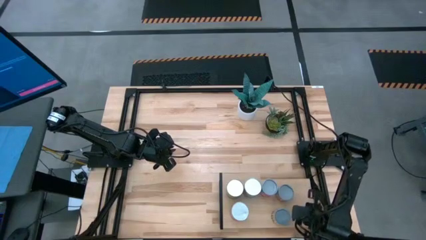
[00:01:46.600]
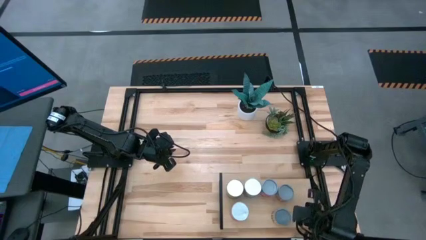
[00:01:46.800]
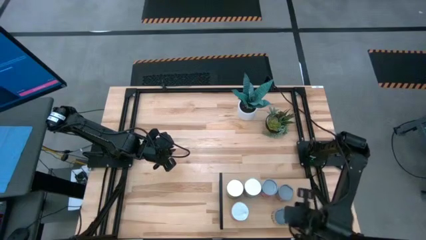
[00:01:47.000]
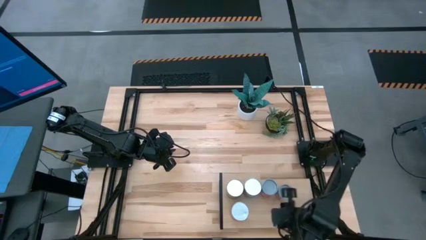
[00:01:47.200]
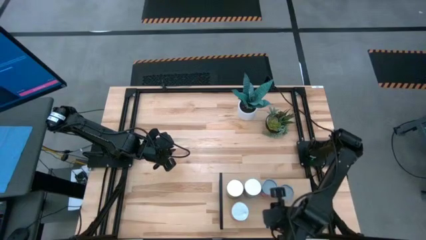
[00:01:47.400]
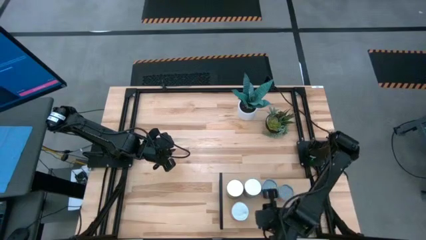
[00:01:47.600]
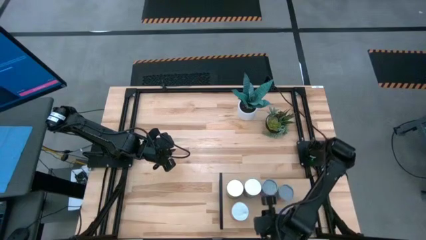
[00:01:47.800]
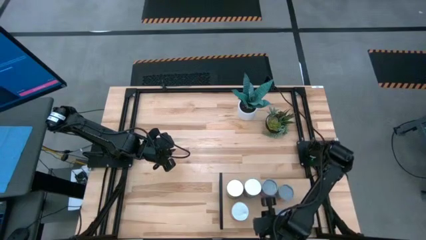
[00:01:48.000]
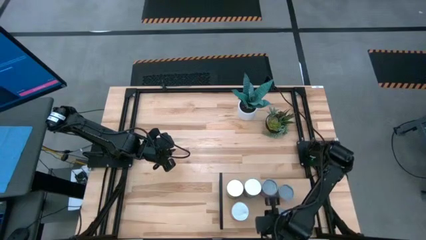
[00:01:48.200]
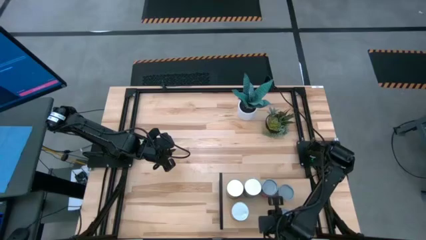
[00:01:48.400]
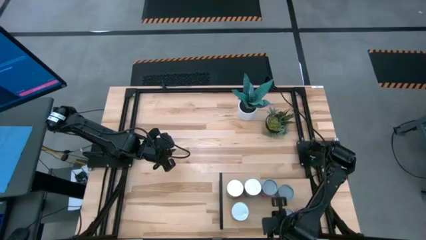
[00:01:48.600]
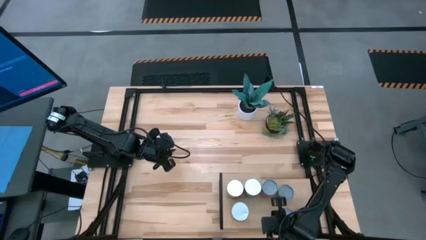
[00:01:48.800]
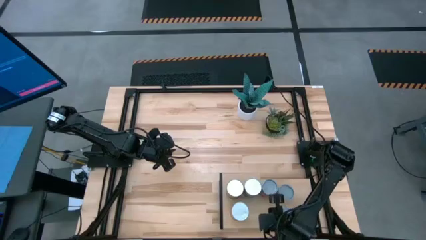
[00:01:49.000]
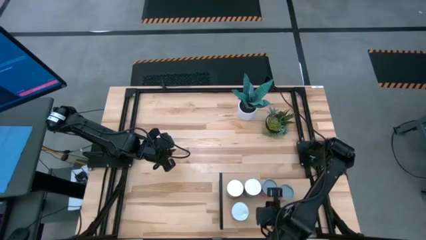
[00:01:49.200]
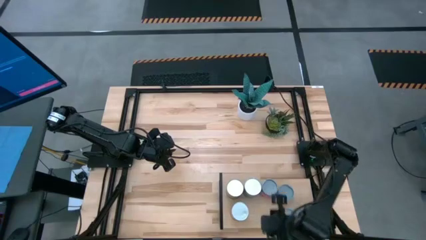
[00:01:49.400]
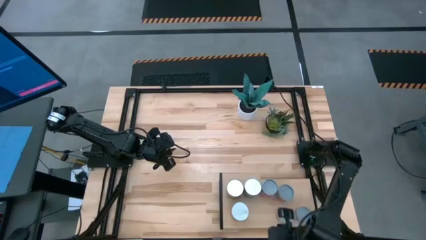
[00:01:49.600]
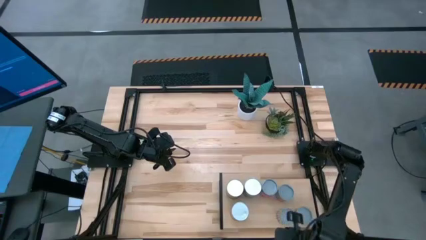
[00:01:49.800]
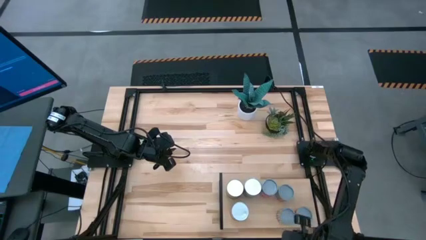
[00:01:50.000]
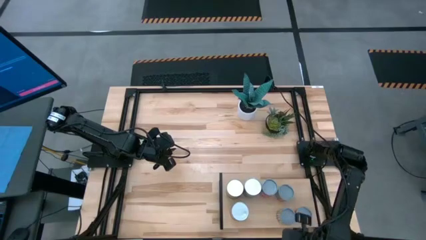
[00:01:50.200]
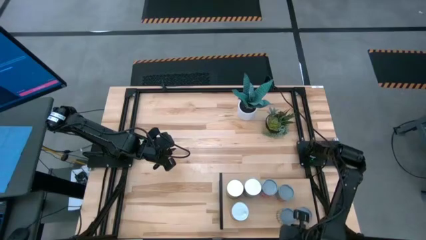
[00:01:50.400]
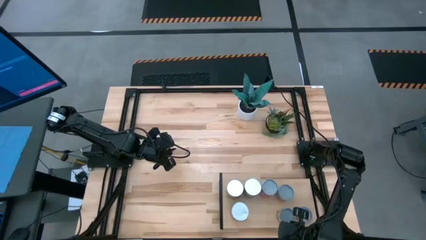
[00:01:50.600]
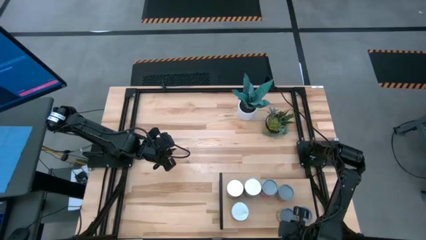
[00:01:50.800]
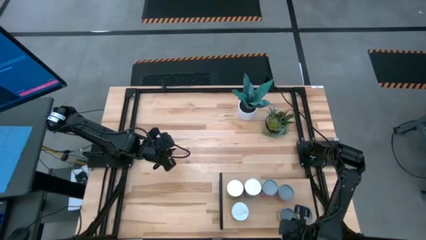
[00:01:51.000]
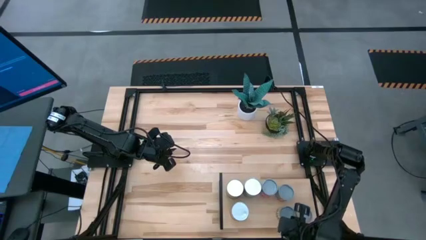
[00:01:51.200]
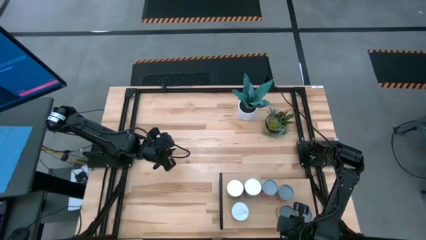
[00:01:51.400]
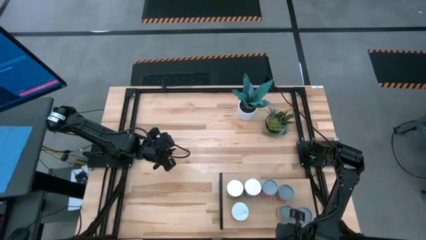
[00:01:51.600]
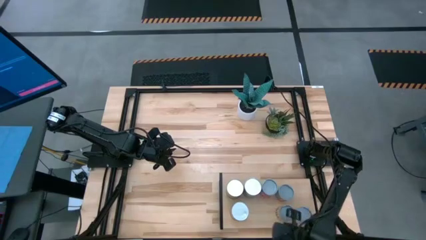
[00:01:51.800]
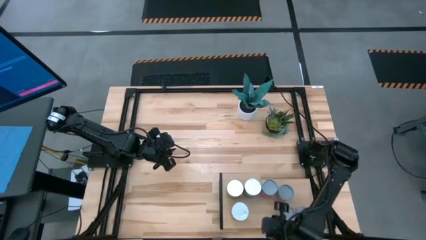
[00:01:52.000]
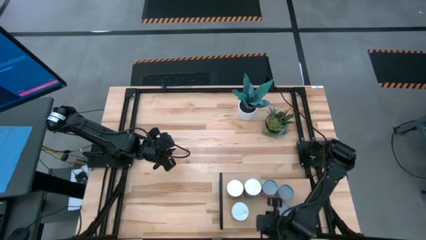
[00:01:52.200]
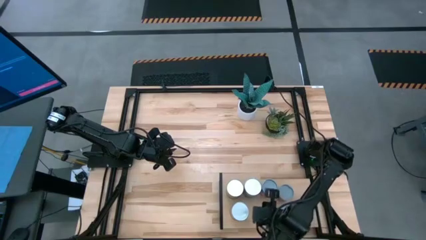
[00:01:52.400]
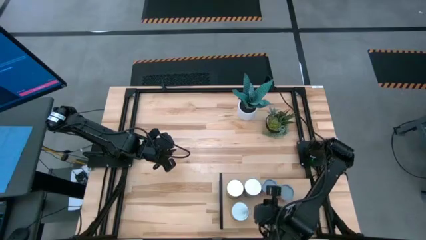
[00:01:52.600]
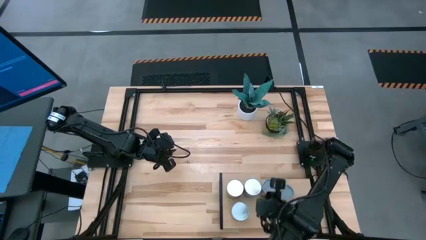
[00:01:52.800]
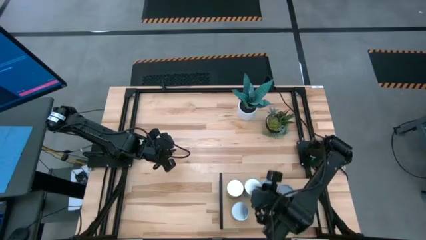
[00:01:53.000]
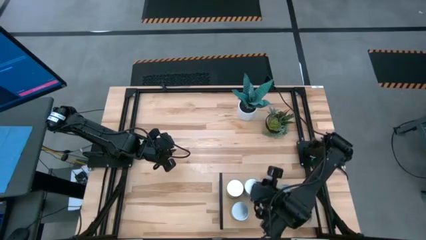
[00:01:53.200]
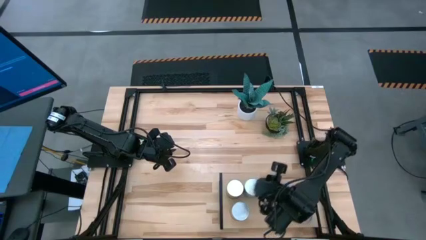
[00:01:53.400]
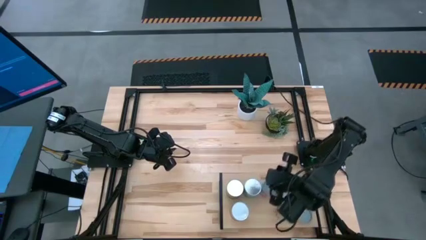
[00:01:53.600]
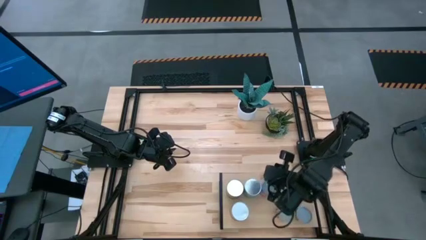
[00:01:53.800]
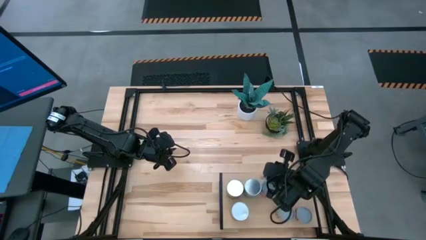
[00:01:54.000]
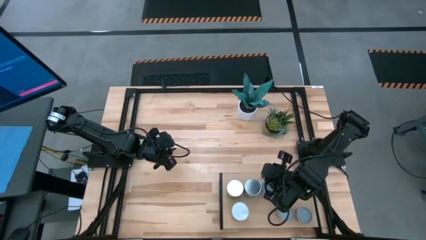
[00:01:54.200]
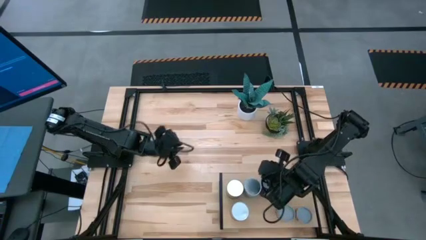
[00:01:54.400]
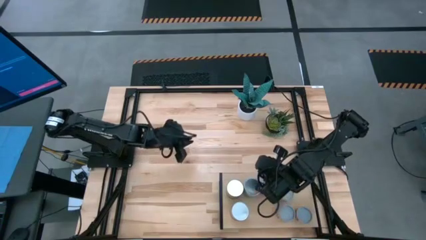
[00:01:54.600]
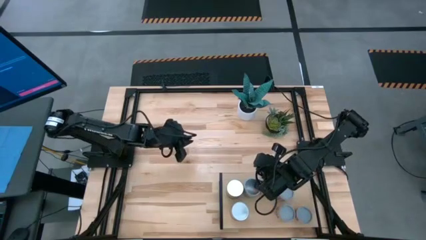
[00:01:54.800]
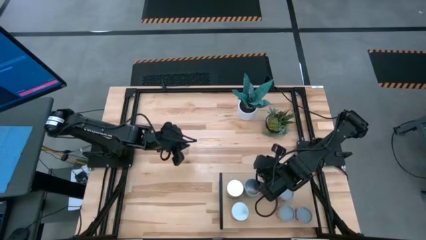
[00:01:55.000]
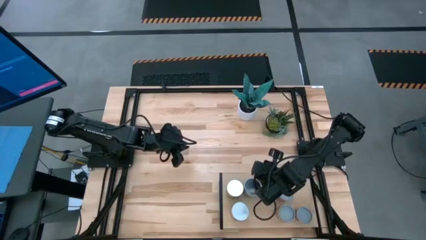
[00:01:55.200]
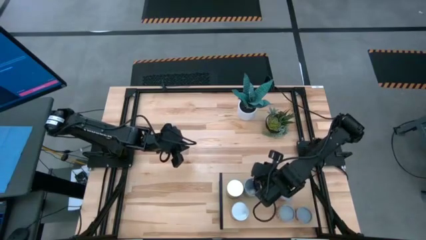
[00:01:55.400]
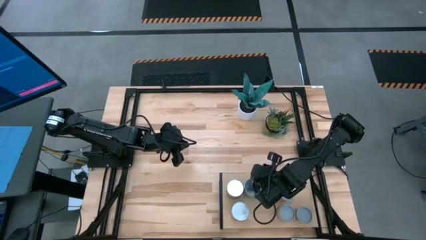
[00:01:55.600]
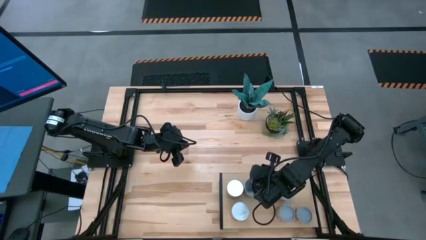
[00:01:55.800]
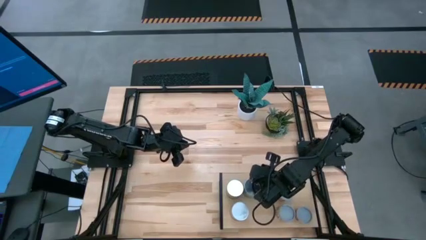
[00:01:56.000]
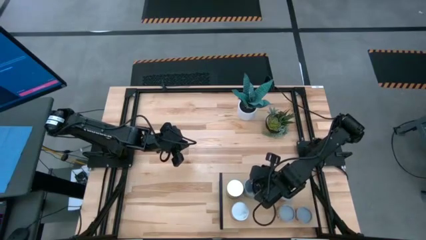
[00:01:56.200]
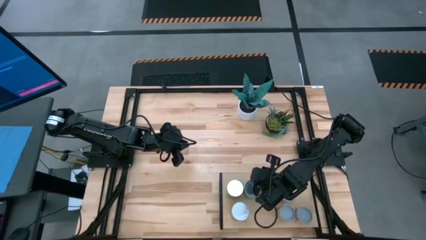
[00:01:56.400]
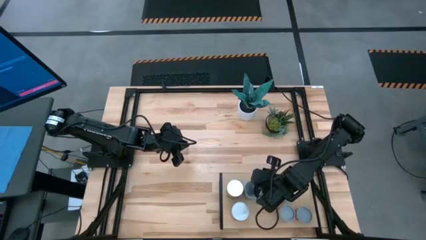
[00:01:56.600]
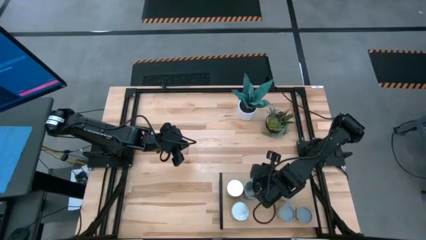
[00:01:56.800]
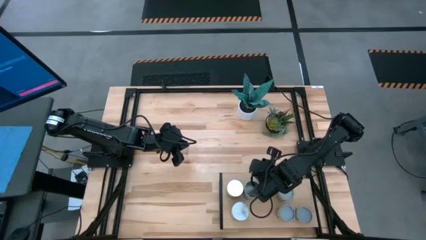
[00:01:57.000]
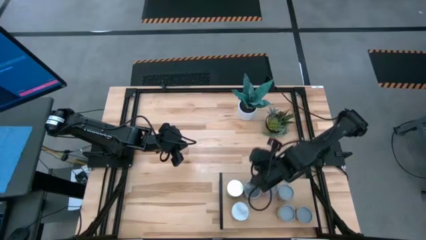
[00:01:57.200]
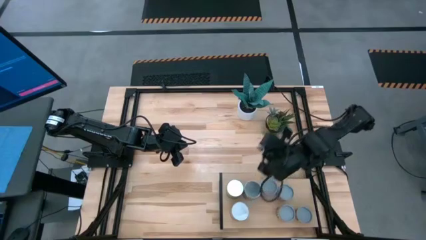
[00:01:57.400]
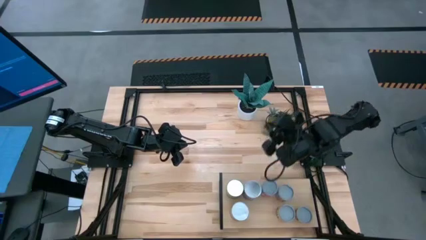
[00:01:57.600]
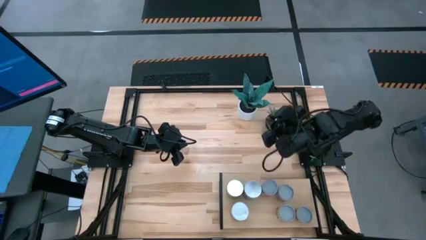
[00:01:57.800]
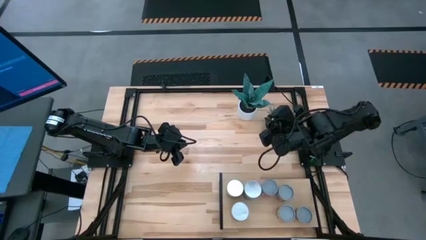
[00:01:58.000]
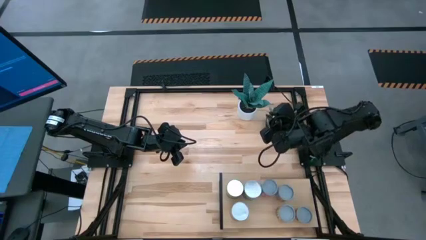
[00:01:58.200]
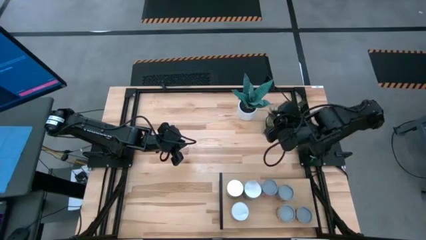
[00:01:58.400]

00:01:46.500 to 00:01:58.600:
Task: Pick and place cans onto a shelf
Adjust the cans on the shelf
